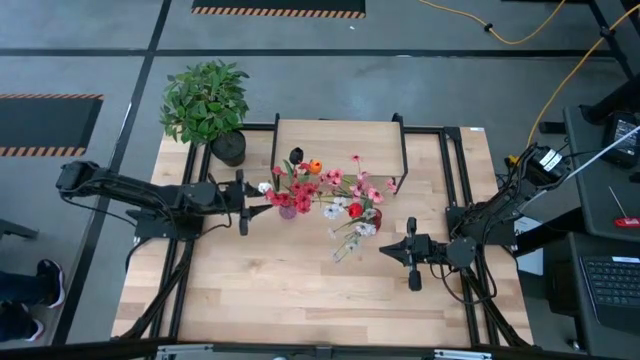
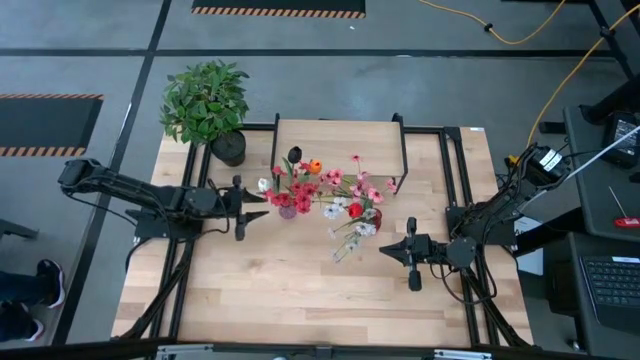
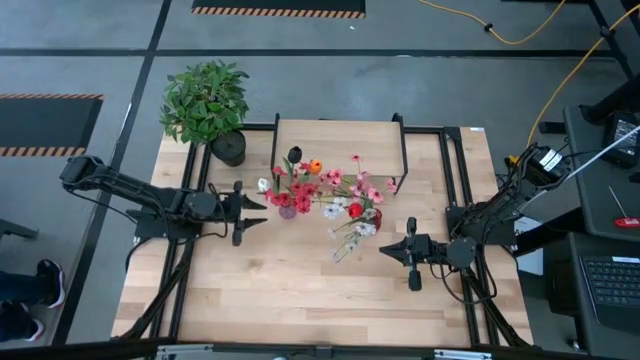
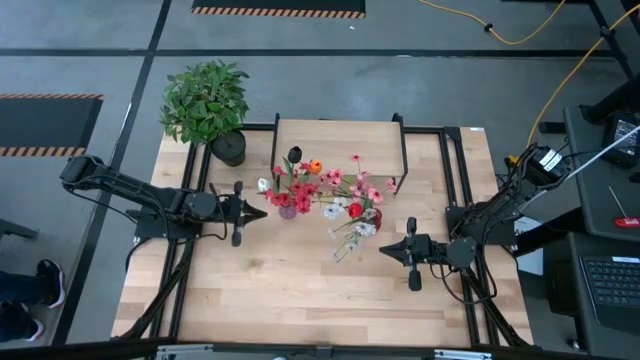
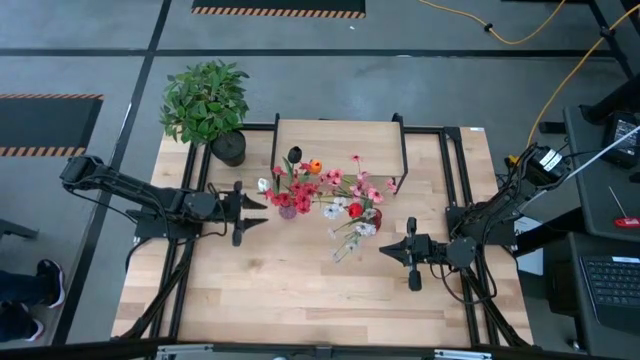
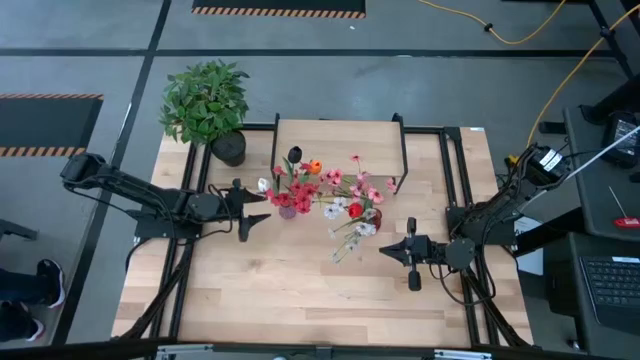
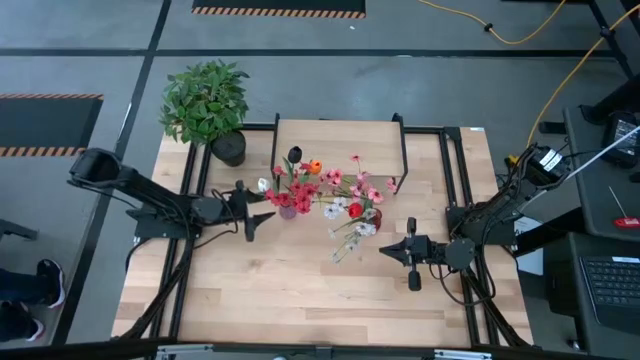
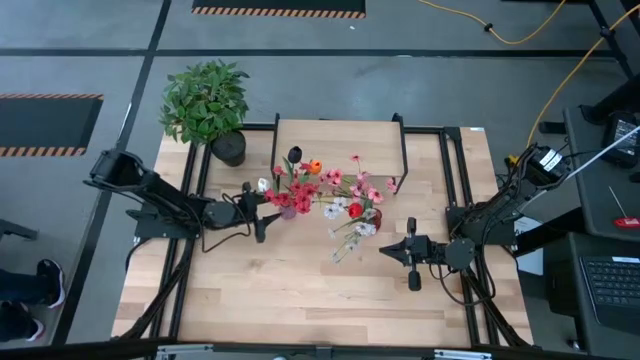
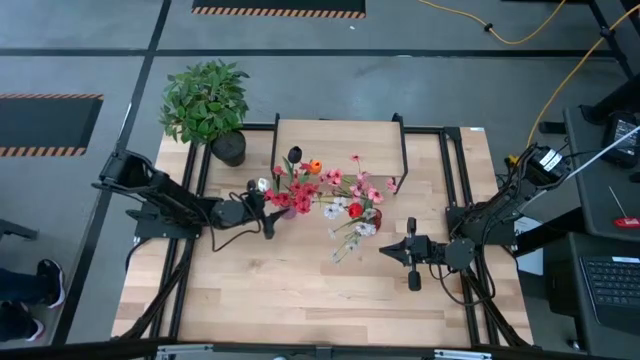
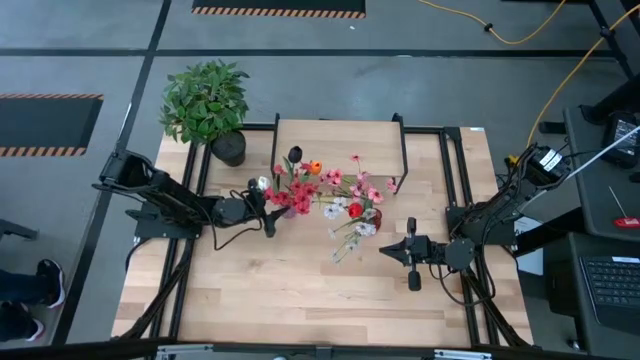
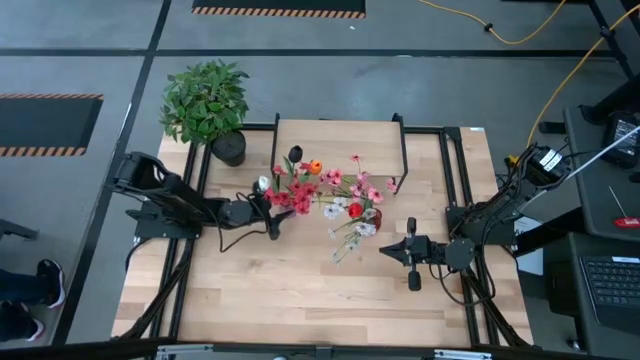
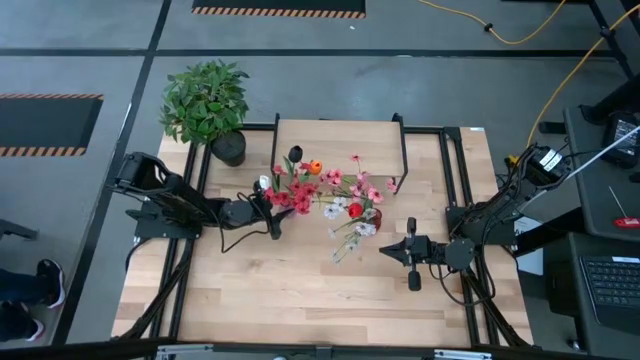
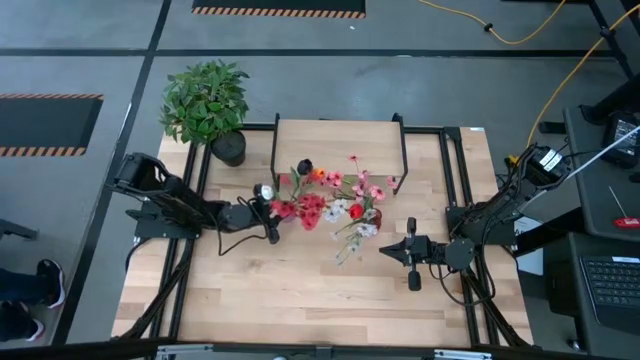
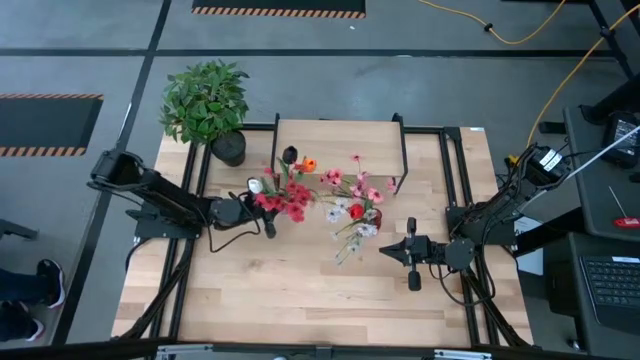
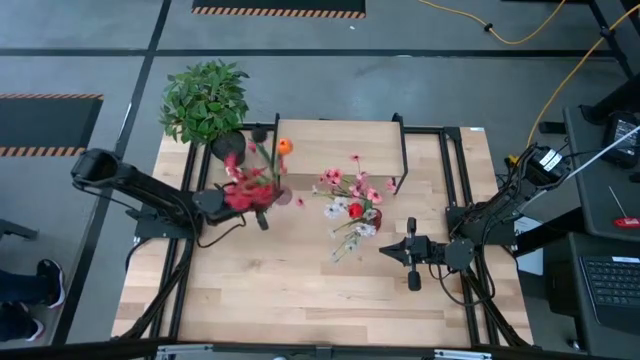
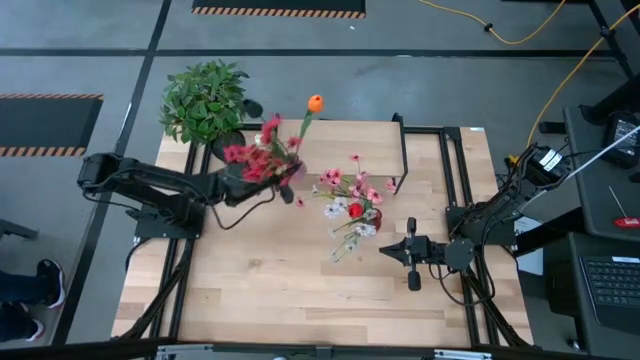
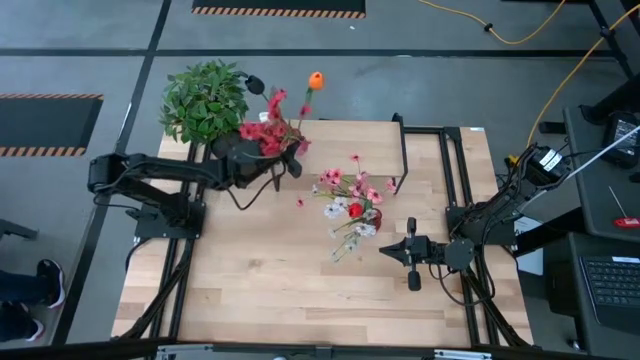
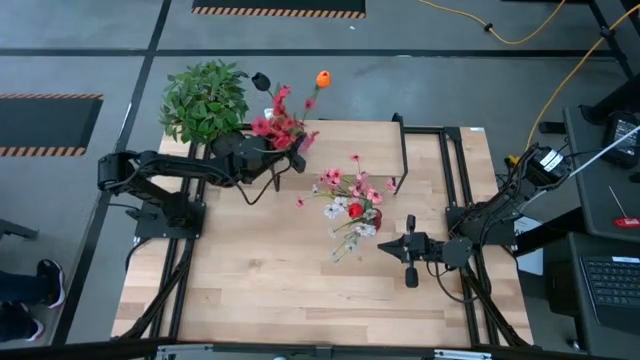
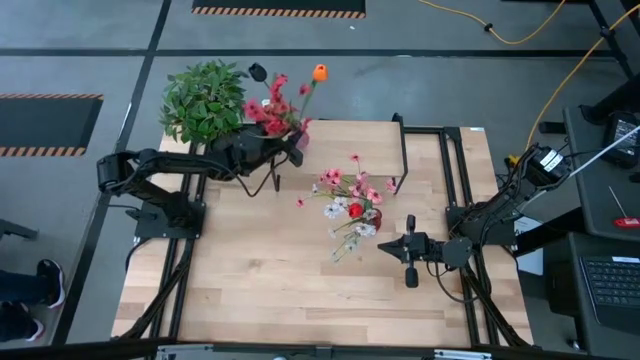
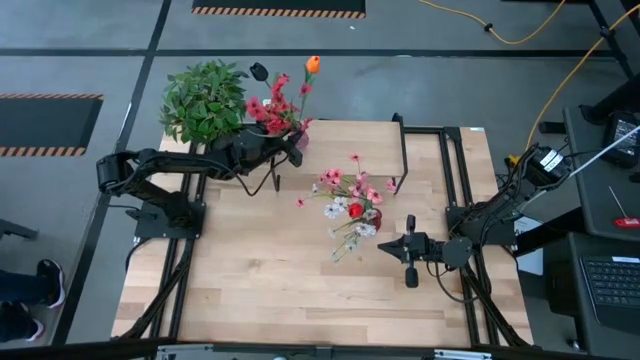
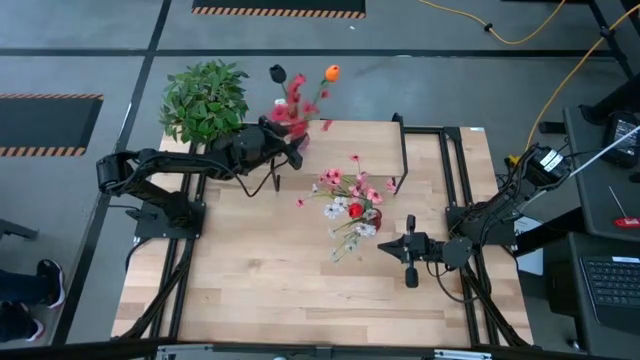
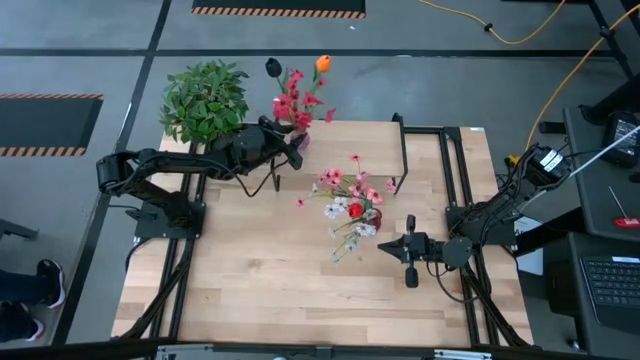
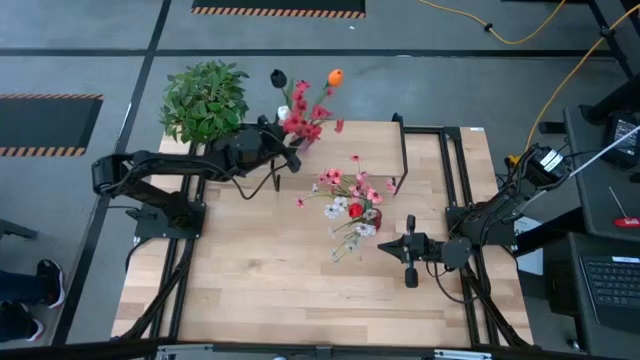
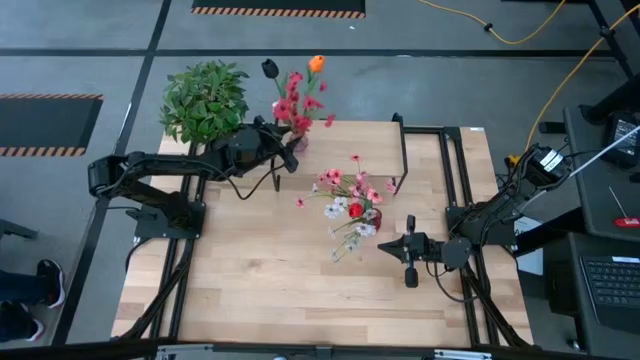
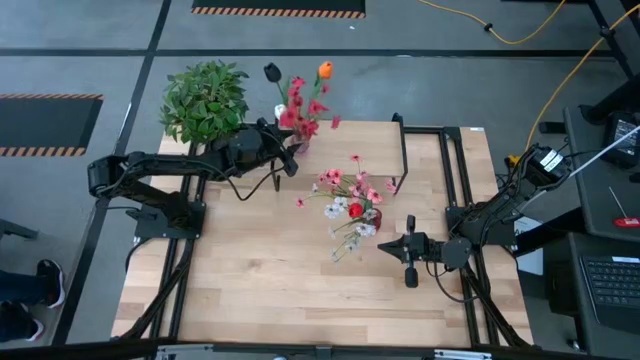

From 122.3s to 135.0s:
Task: Pick and place flowers into a vace then onto a shelf
Put the purple vase on the shelf

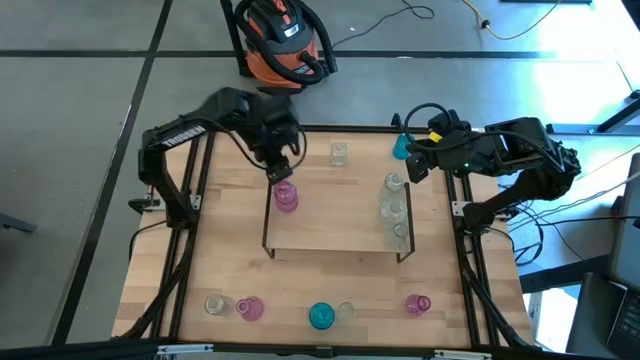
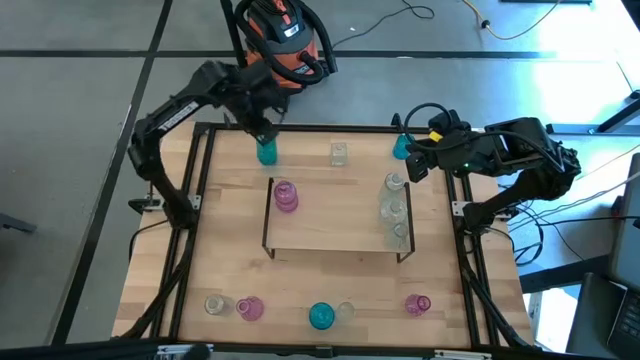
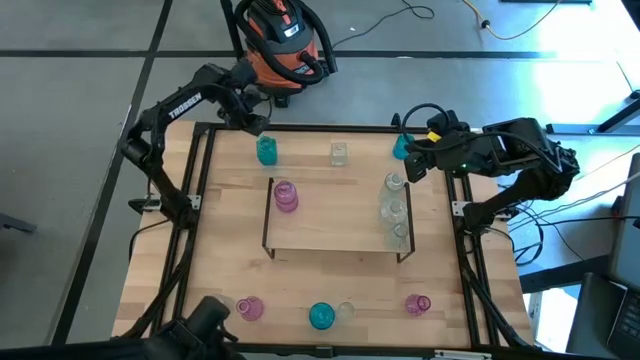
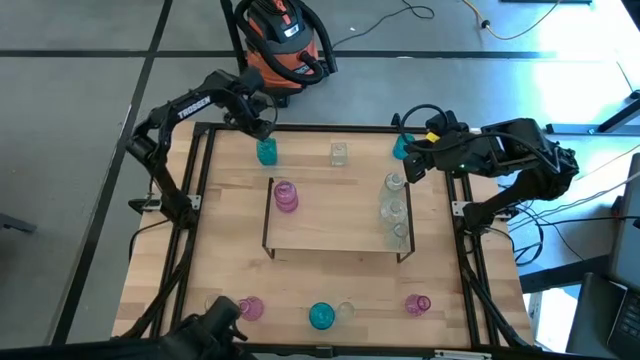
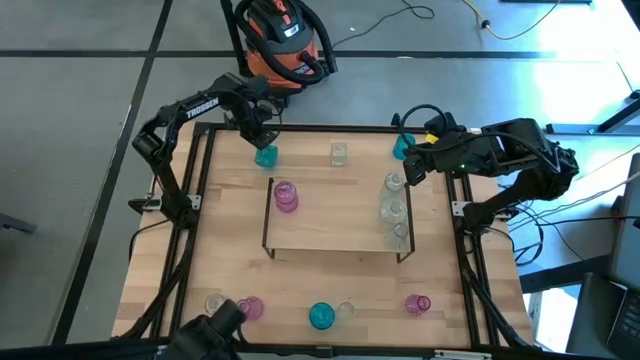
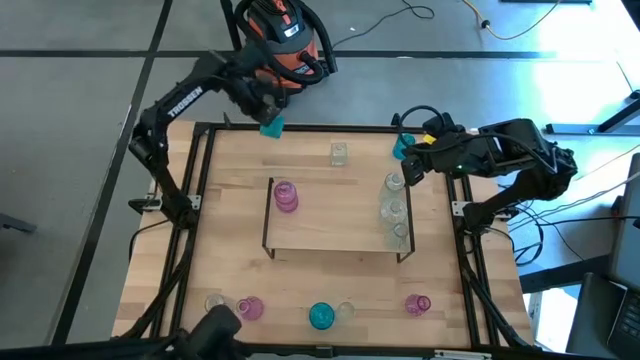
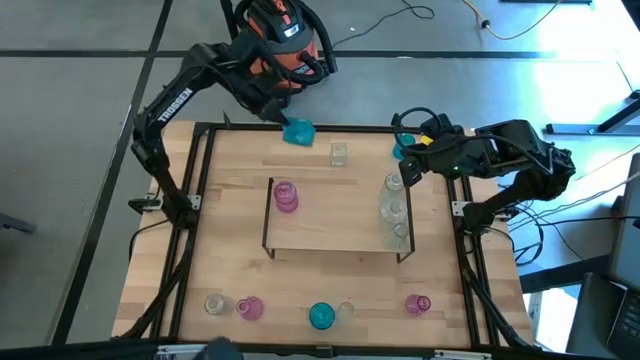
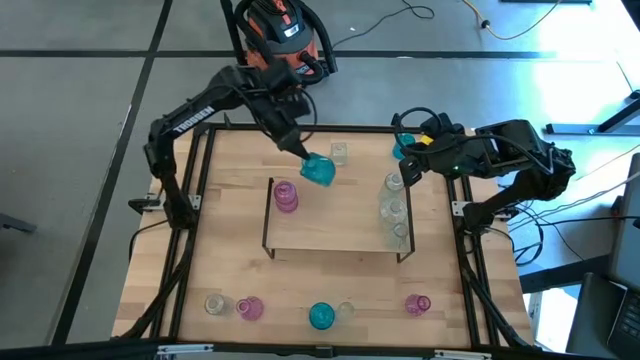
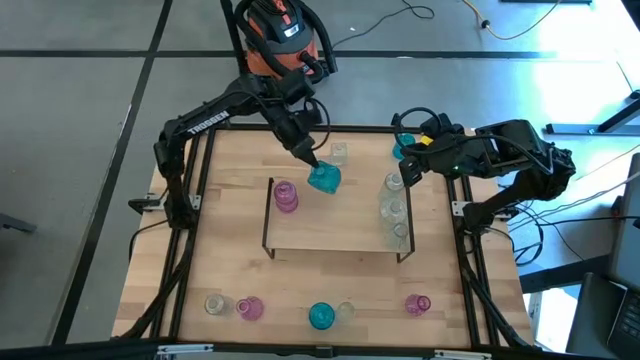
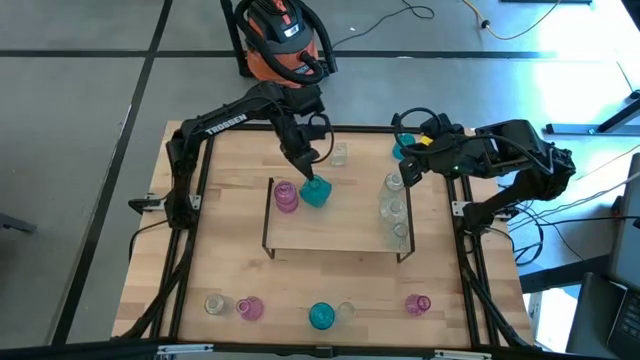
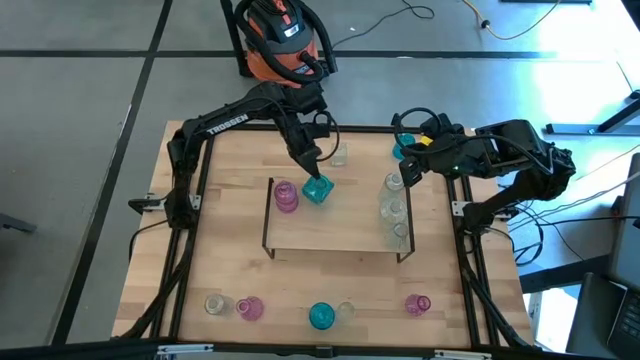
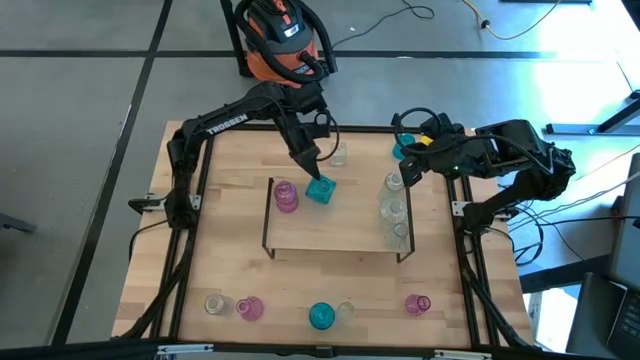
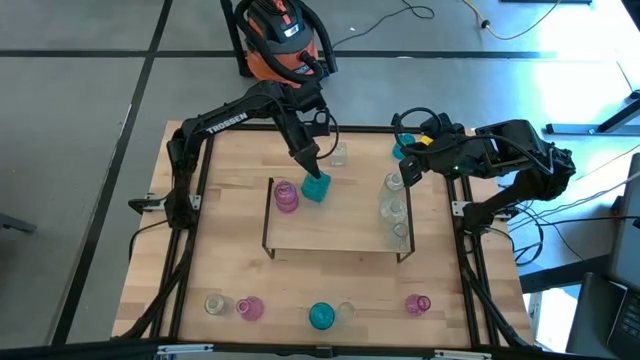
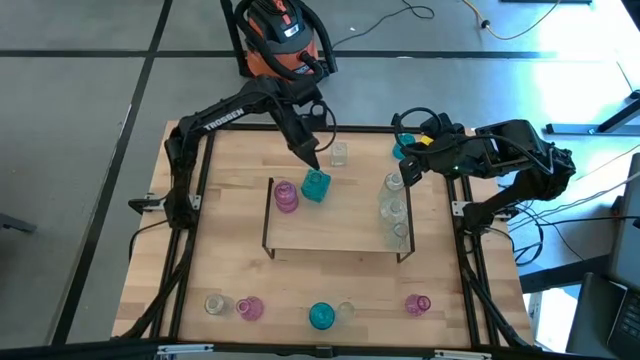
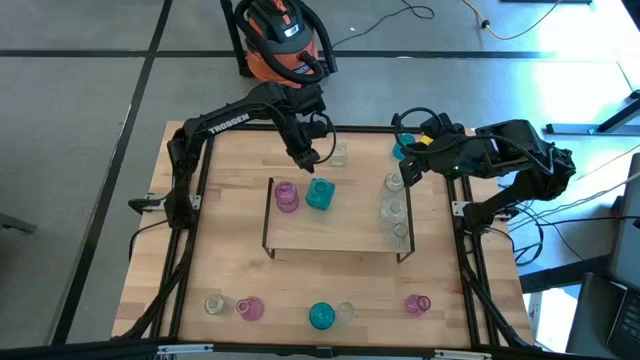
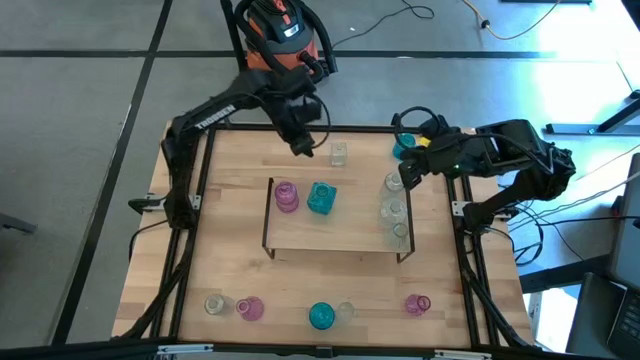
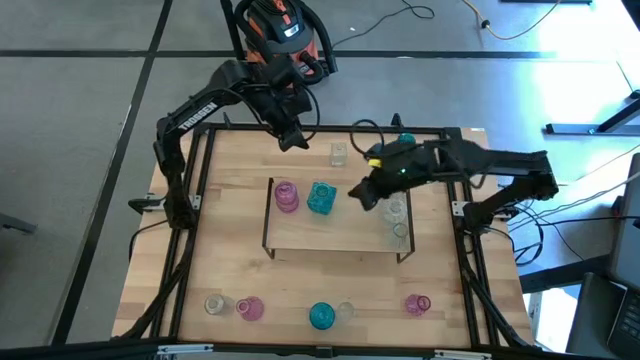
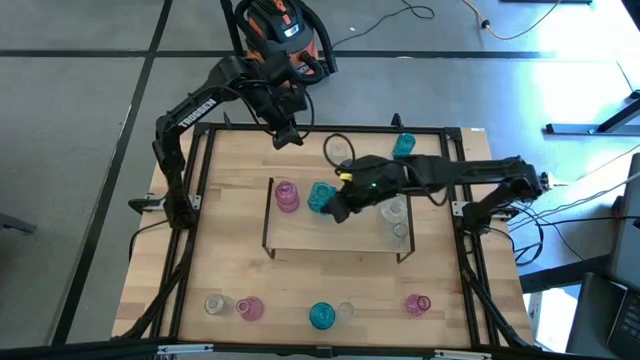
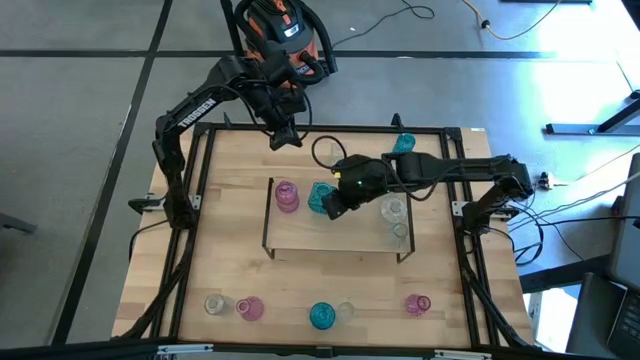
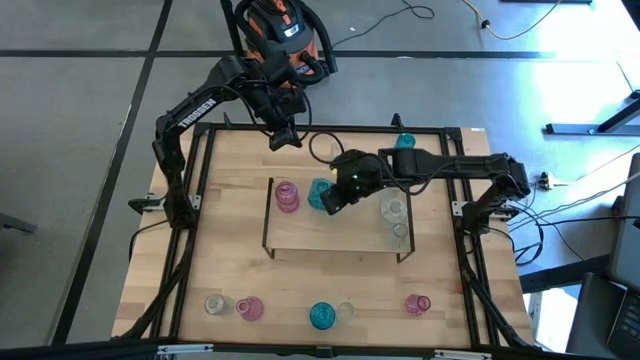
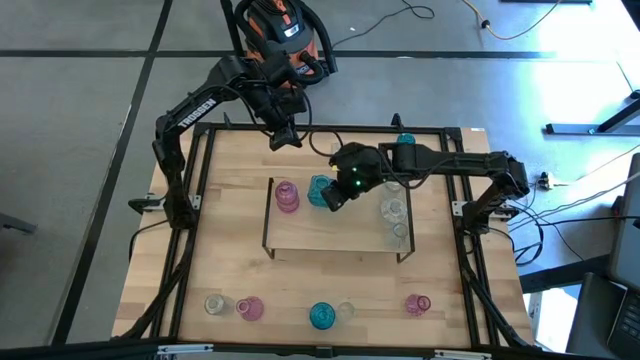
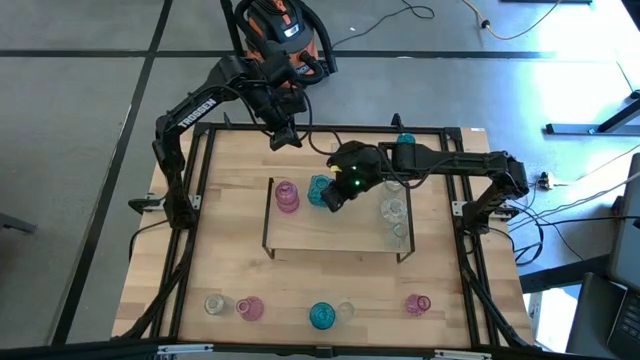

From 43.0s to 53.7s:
Task: sort vases onto shelf
Put the blue vase on the shelf
